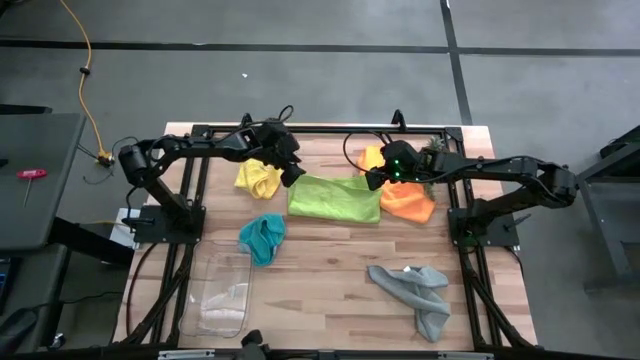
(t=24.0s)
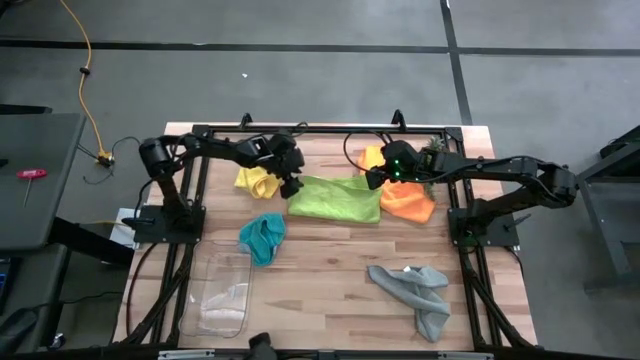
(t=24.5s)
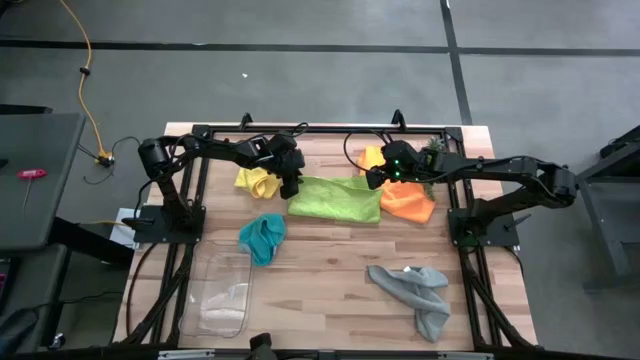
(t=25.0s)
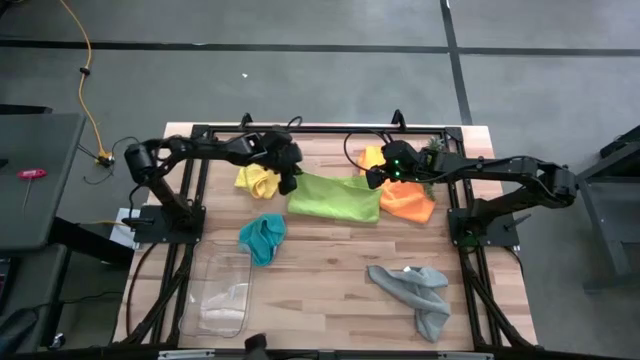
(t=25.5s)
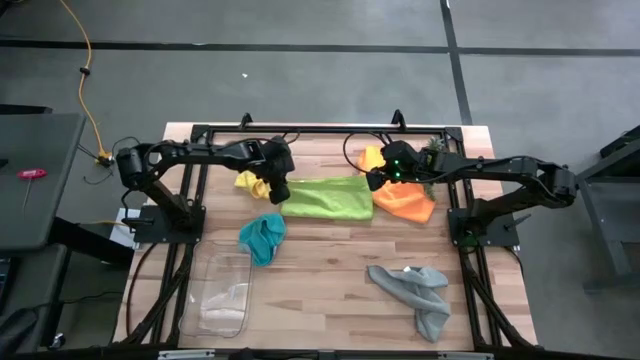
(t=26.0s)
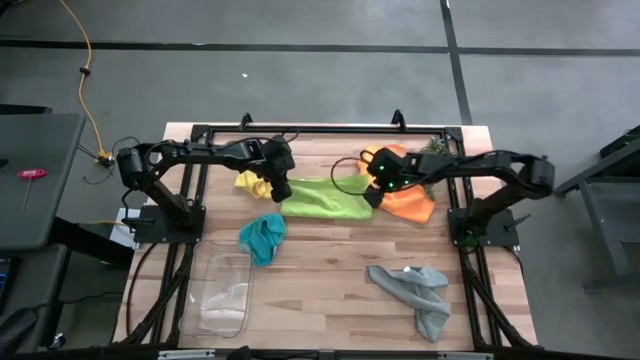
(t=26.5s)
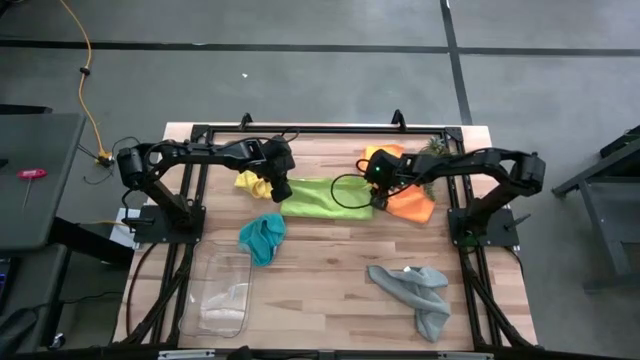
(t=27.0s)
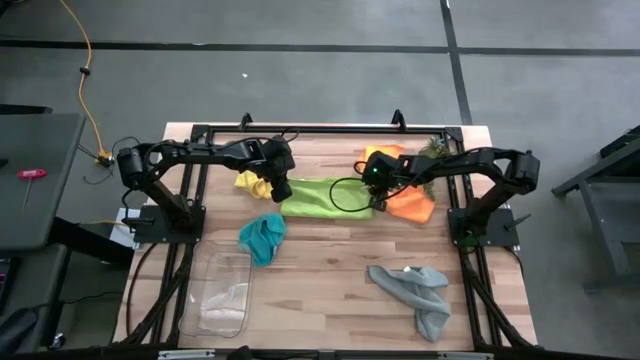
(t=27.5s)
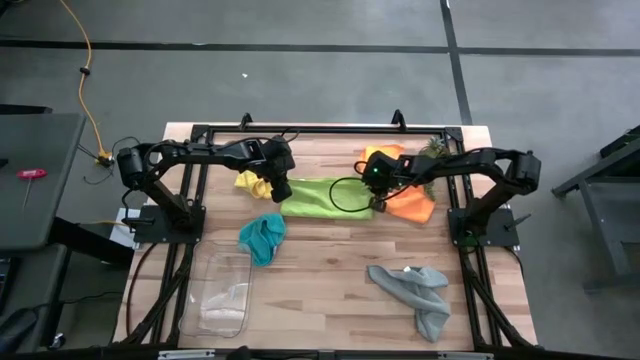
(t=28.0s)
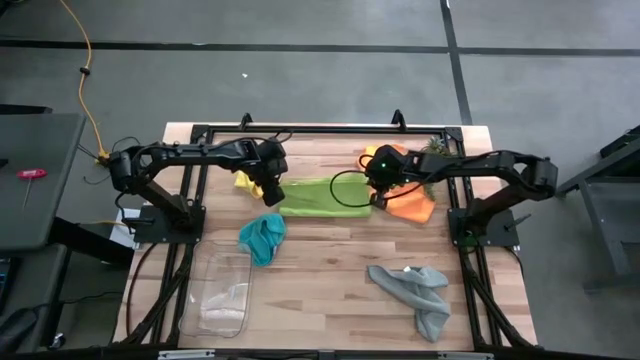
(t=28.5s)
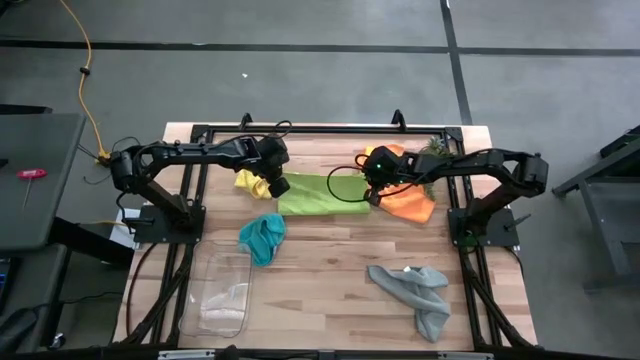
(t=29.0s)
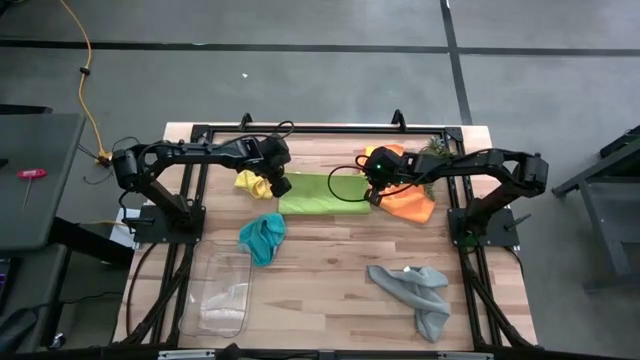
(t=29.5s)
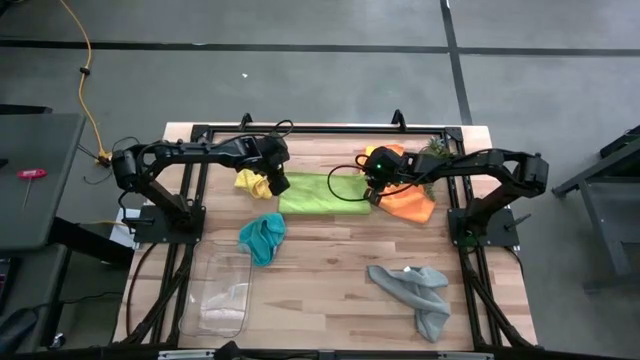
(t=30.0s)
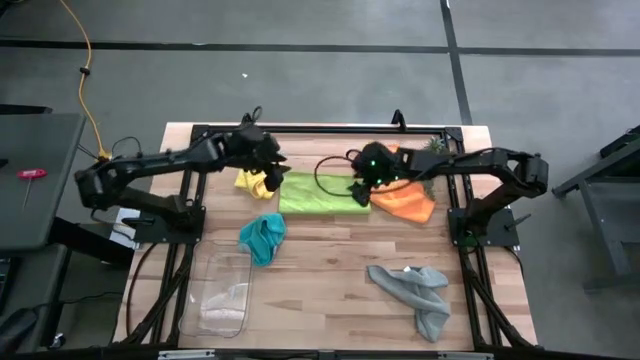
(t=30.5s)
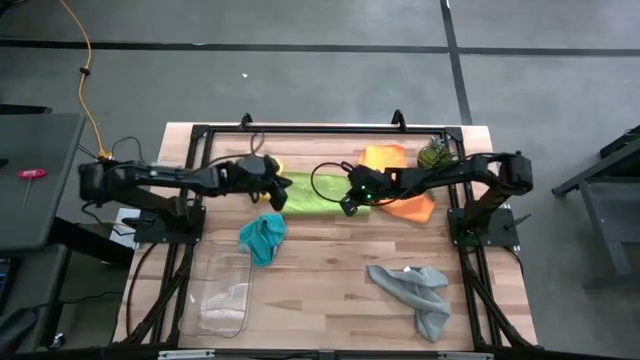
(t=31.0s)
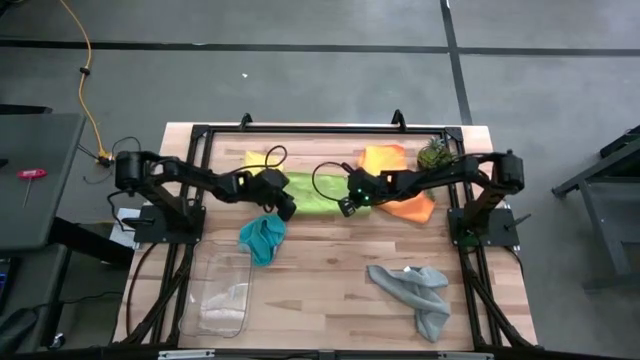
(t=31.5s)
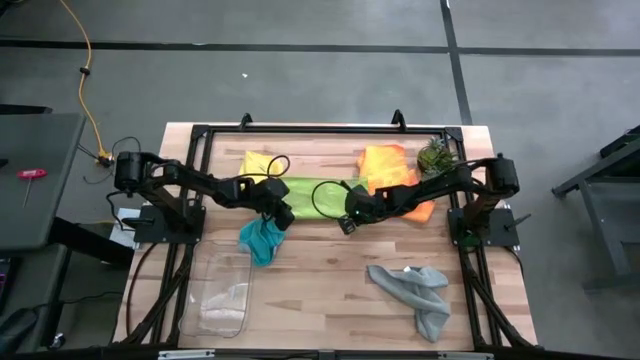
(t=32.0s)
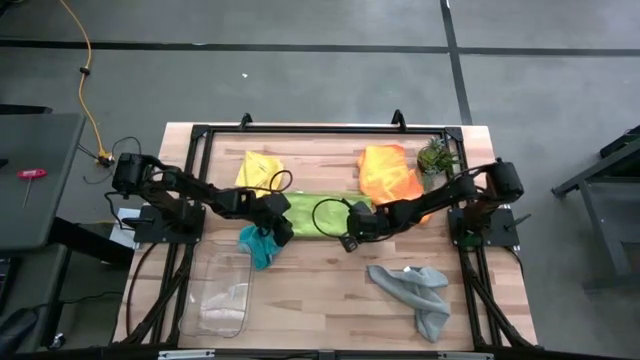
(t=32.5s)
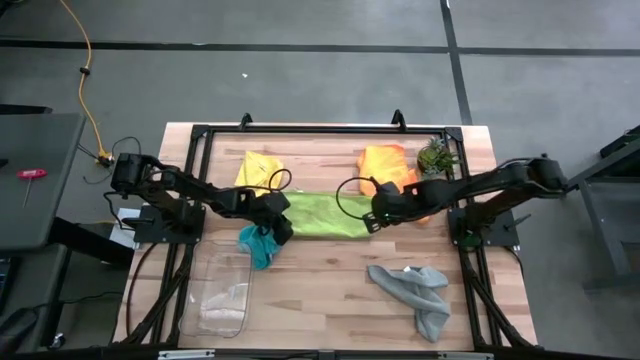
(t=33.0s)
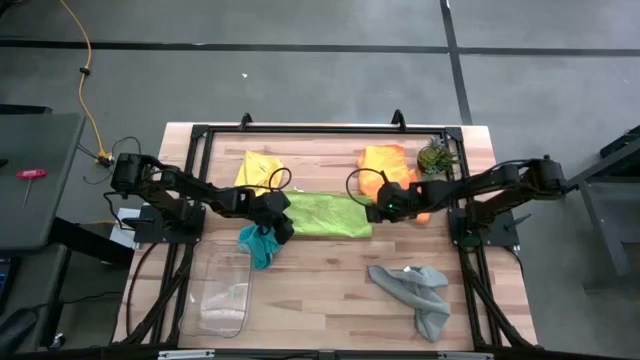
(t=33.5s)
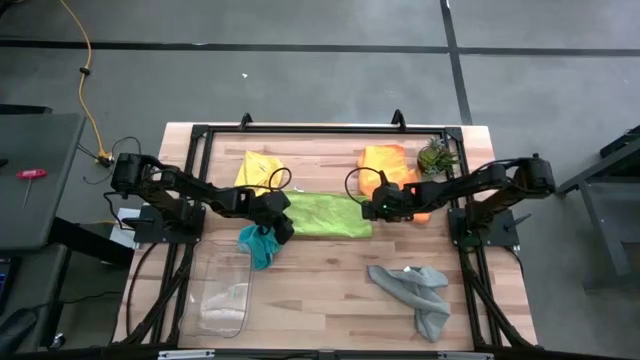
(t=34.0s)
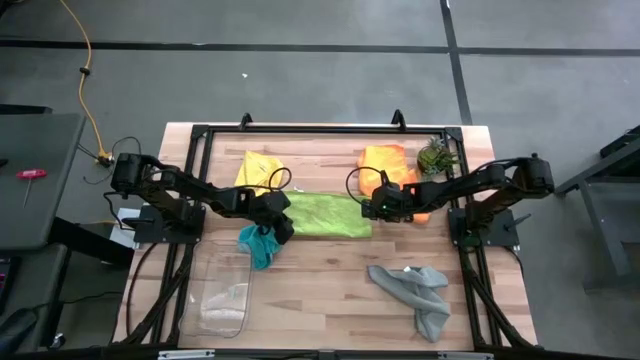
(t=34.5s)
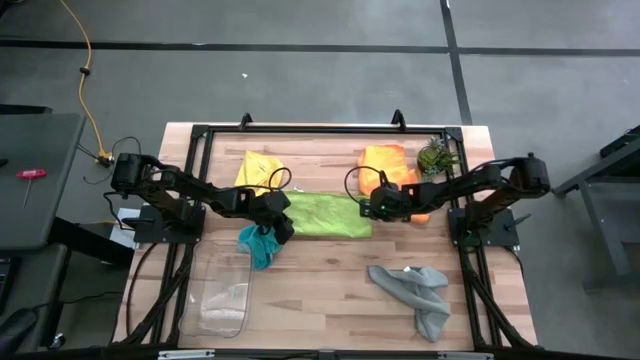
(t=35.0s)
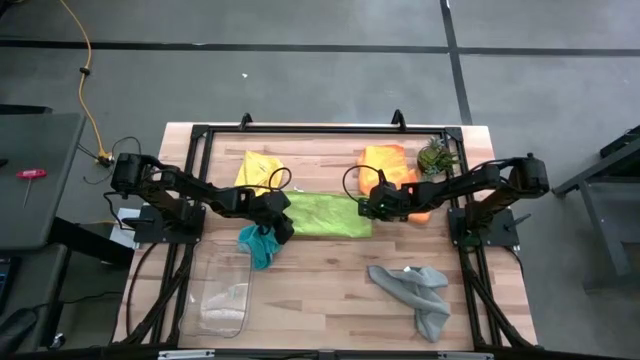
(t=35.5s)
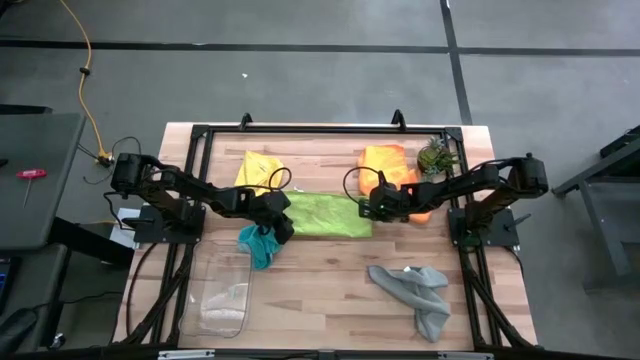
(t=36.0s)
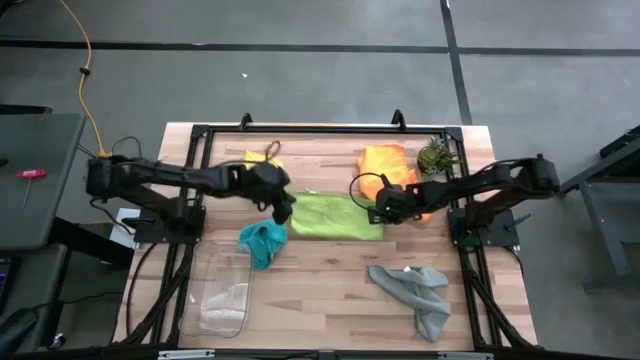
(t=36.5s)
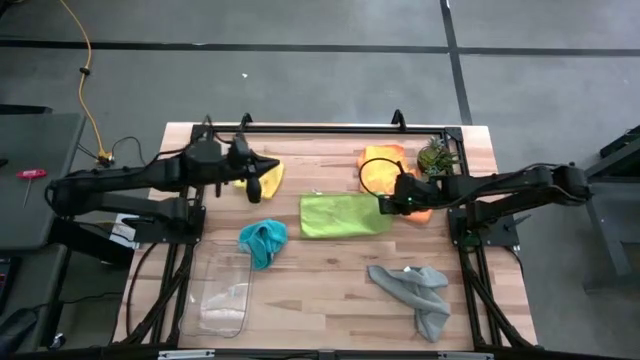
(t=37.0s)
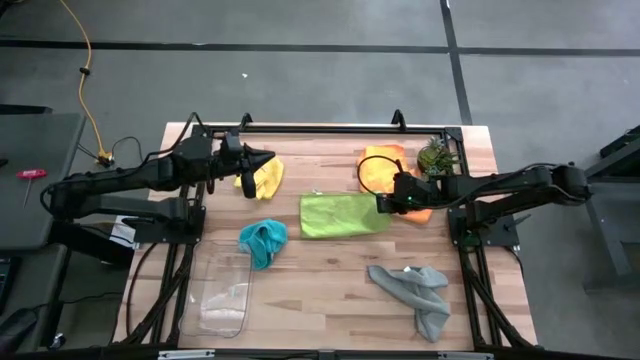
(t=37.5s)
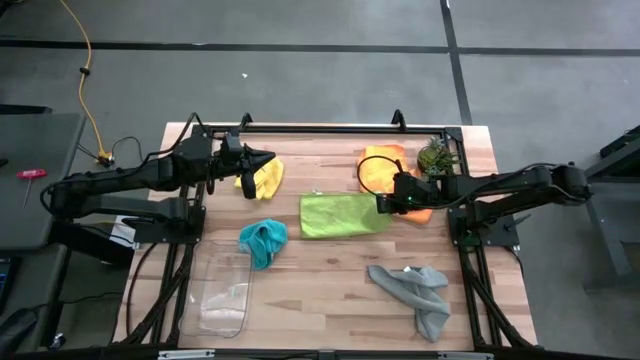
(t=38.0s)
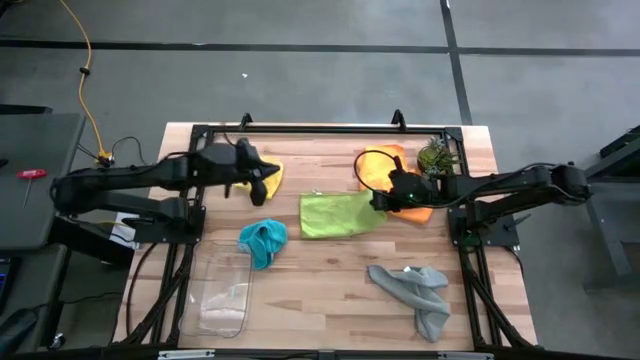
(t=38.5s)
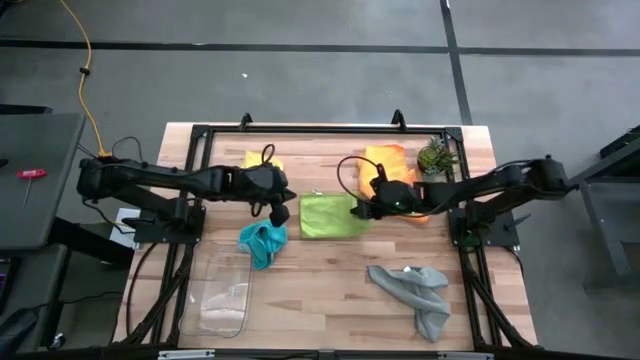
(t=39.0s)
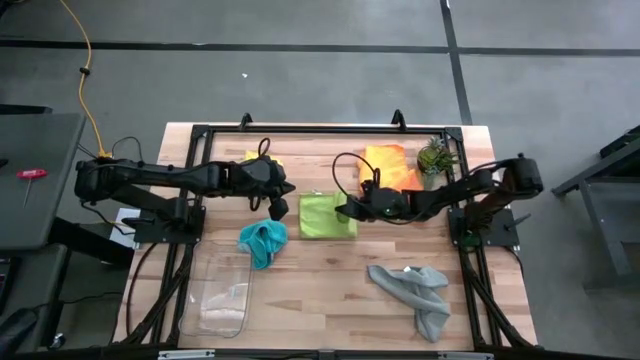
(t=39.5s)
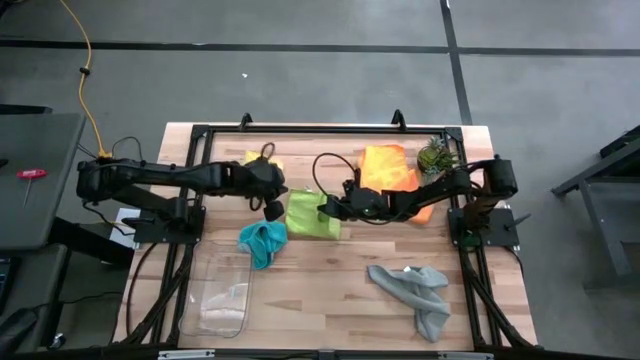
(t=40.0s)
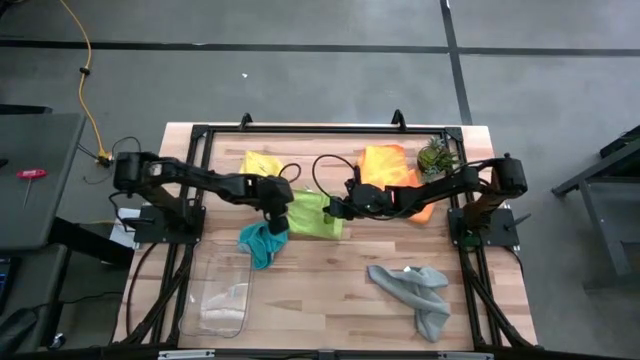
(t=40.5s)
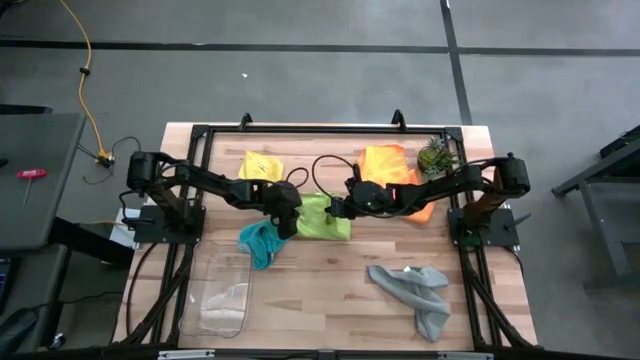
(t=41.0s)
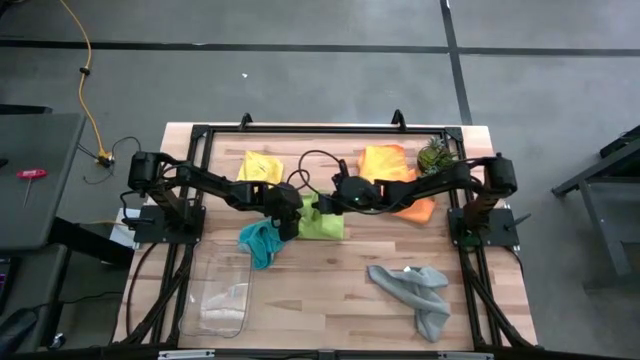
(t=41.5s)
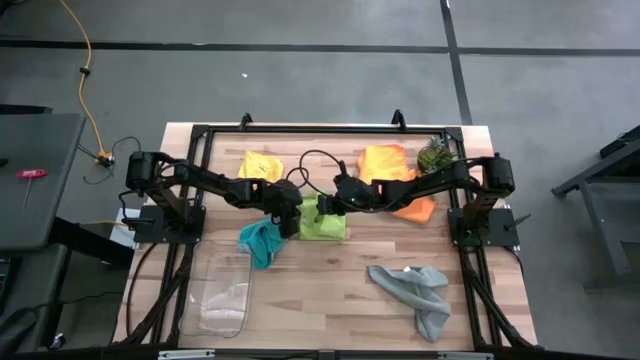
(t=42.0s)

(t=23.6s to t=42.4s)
Task: Fold microfiber towels
Fold the green microfiber towel

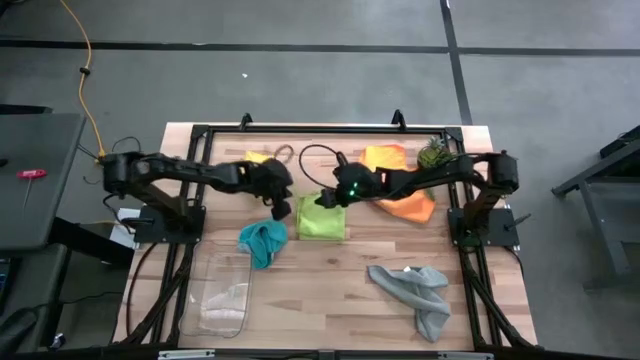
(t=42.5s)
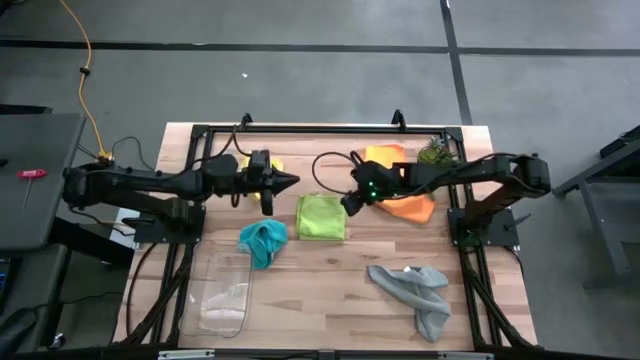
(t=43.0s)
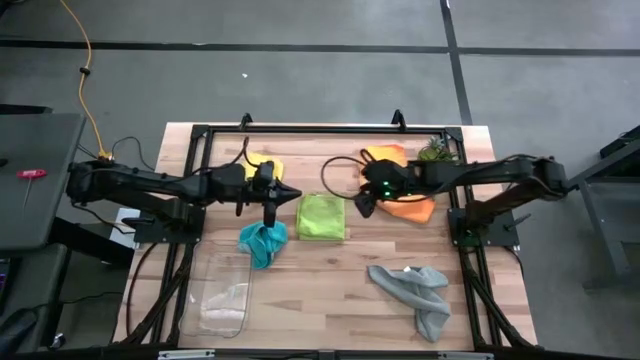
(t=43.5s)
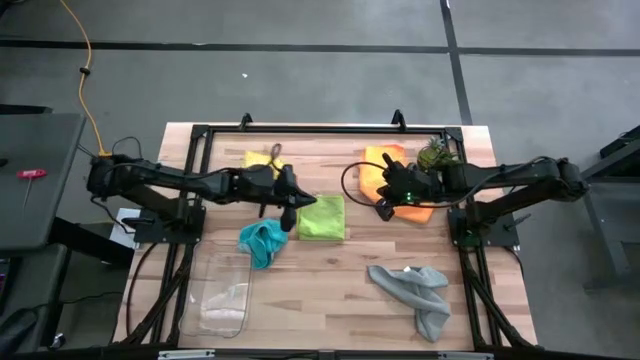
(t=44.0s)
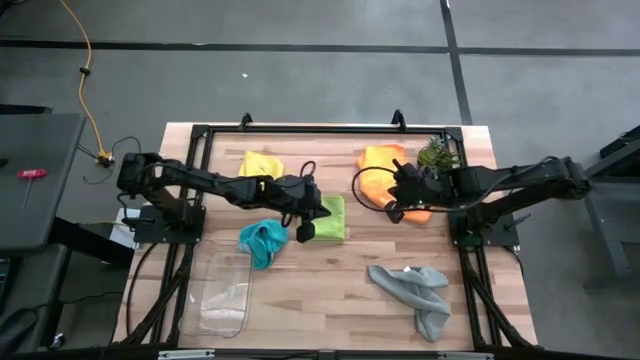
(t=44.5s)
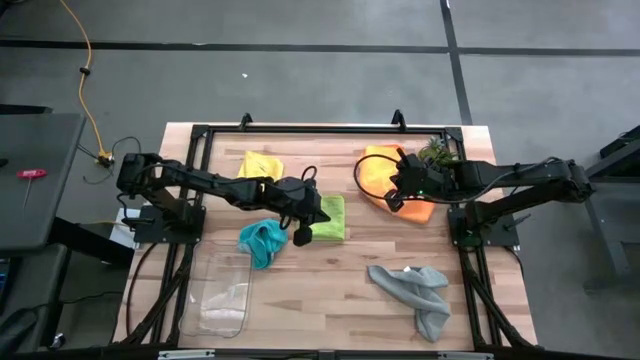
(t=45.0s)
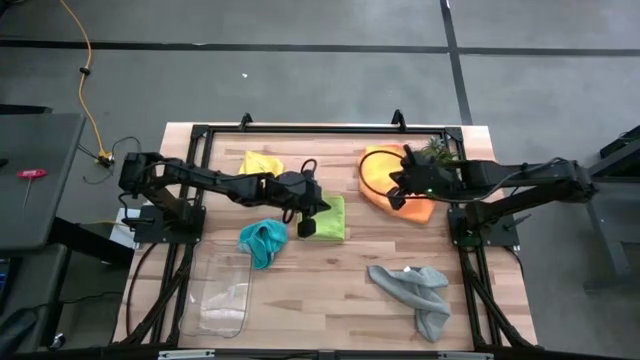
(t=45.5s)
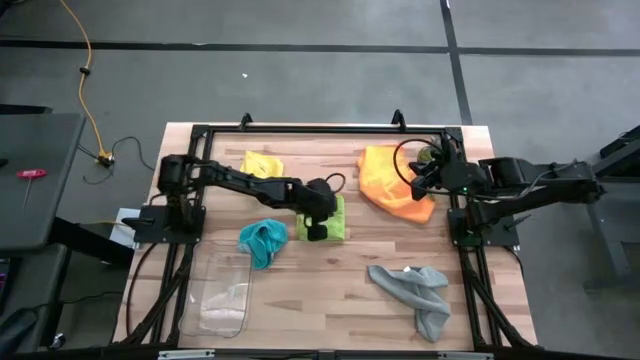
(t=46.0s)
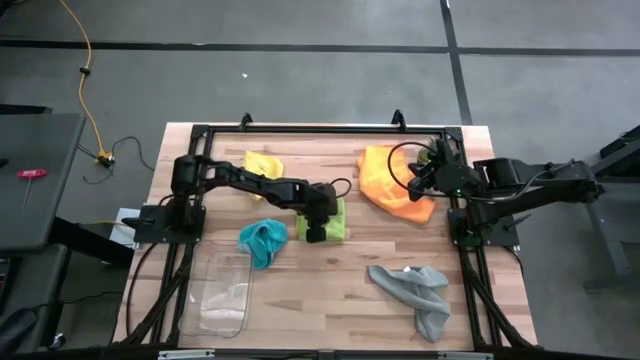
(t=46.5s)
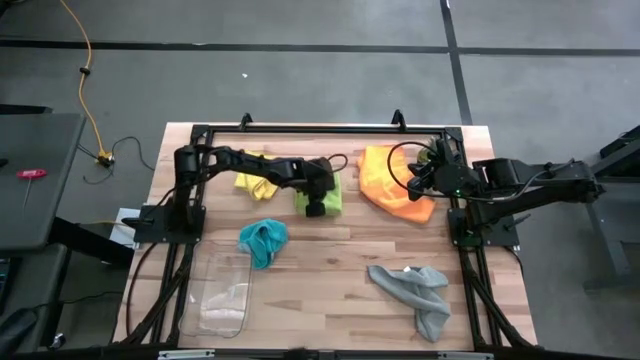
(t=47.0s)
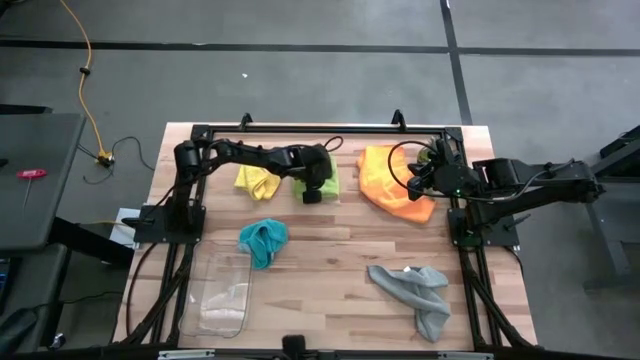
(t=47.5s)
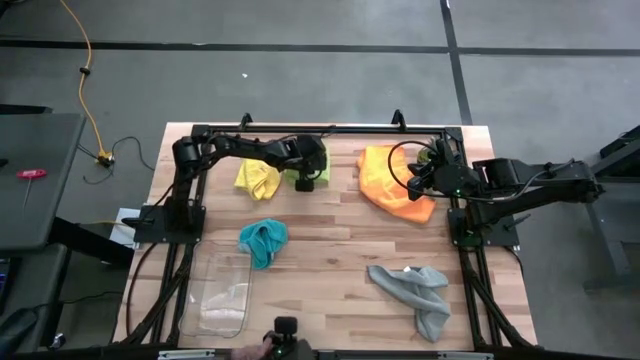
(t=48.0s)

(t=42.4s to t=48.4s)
Move the green microfiber towel to the top of the table
